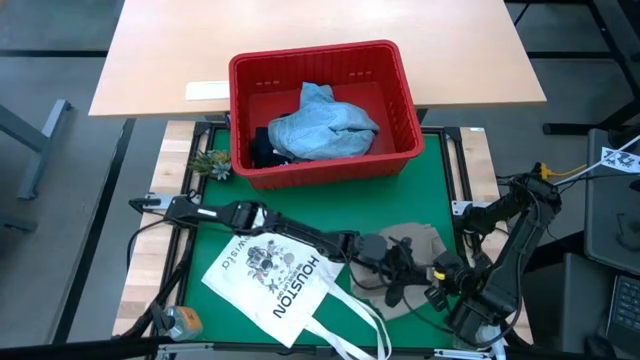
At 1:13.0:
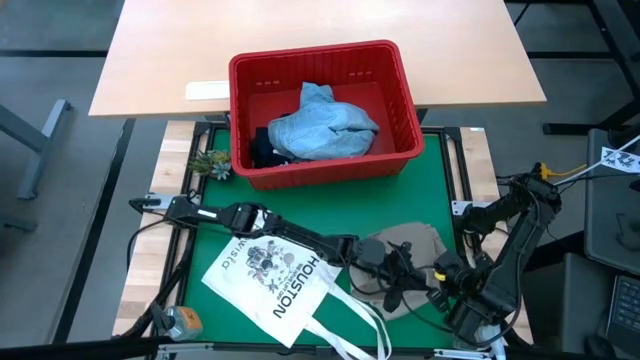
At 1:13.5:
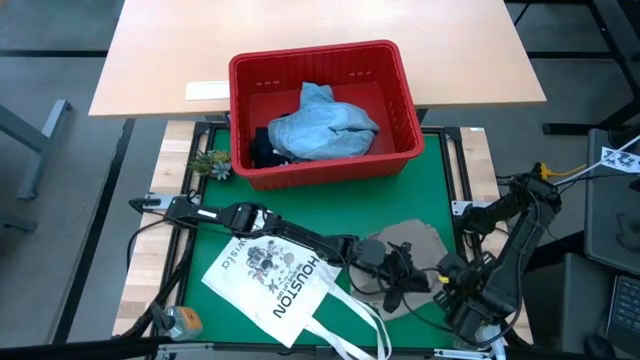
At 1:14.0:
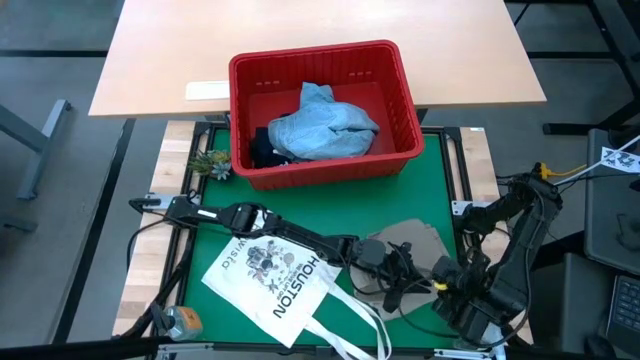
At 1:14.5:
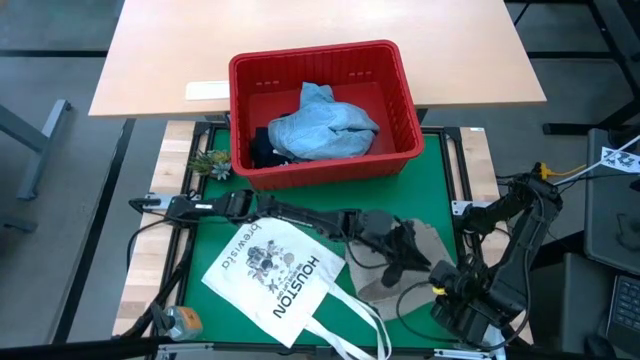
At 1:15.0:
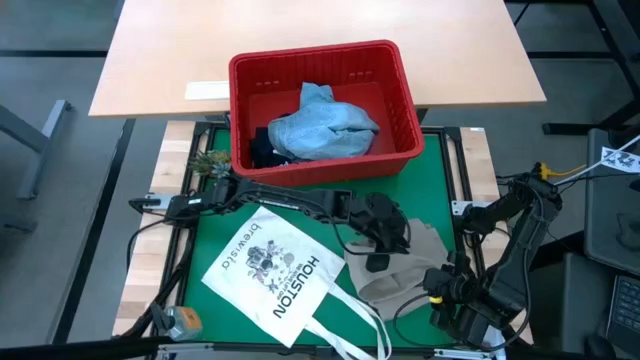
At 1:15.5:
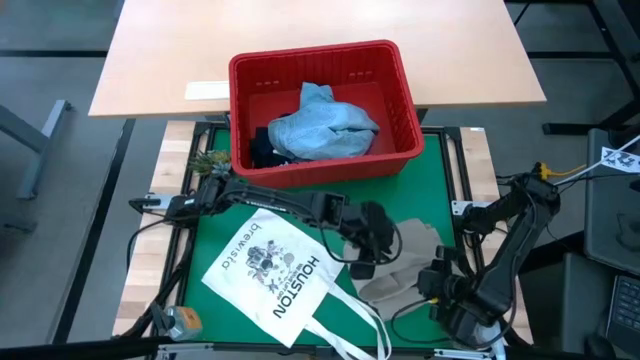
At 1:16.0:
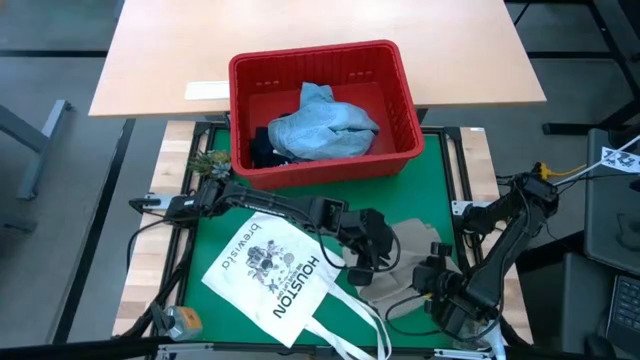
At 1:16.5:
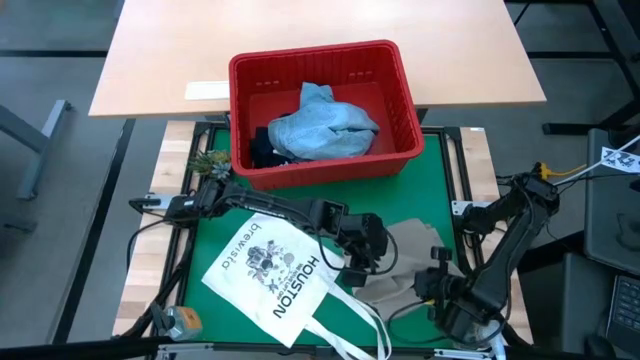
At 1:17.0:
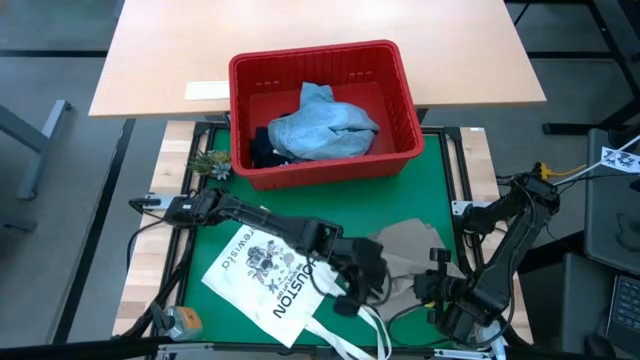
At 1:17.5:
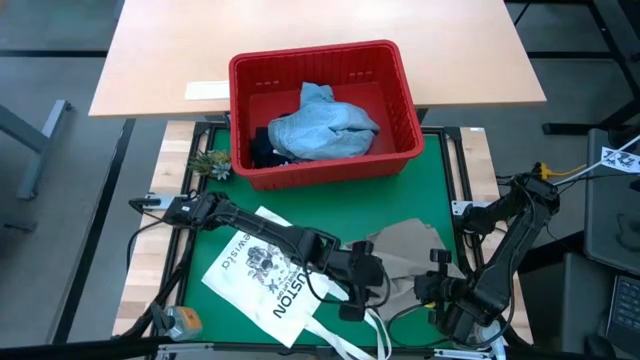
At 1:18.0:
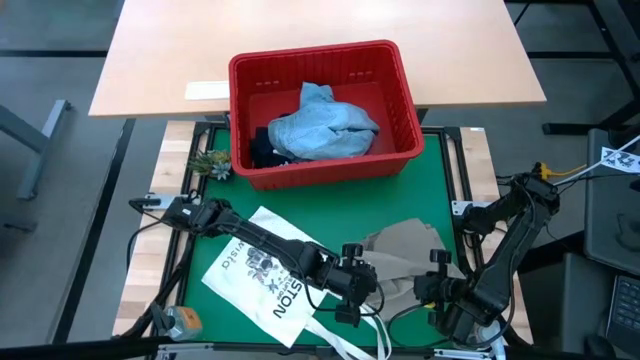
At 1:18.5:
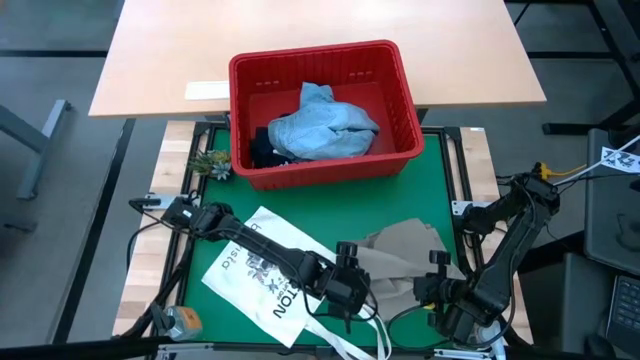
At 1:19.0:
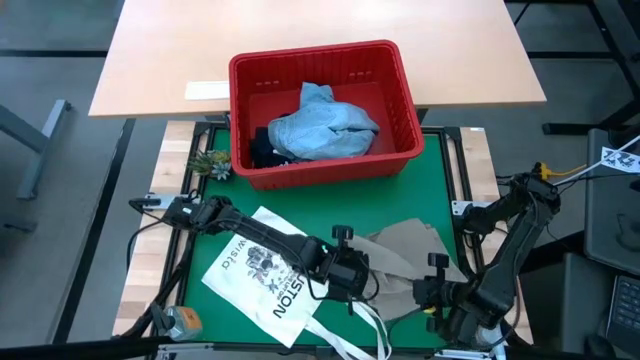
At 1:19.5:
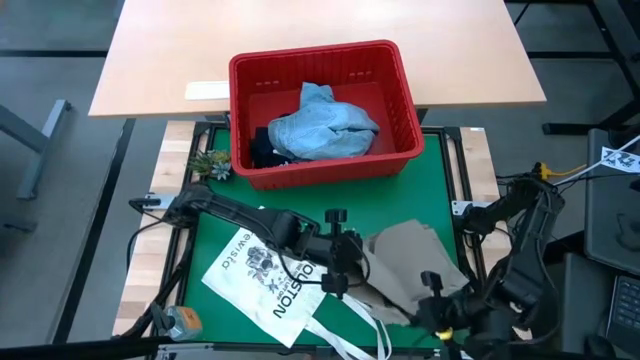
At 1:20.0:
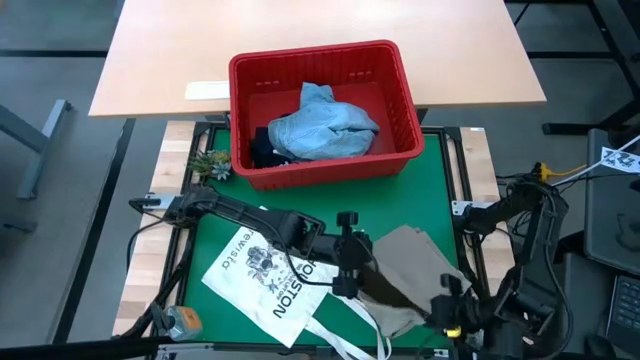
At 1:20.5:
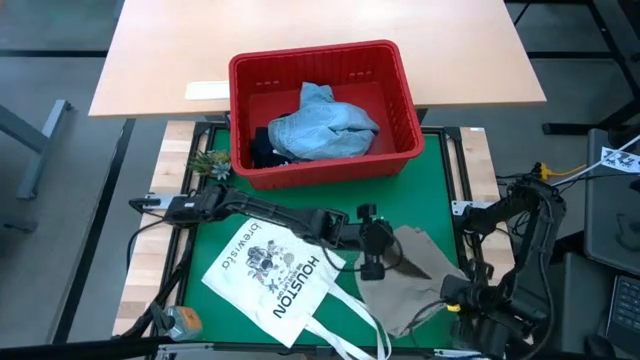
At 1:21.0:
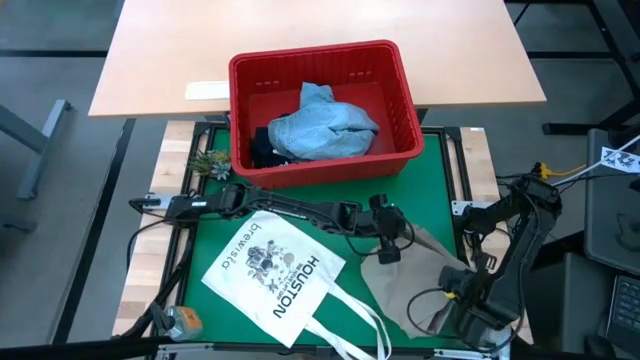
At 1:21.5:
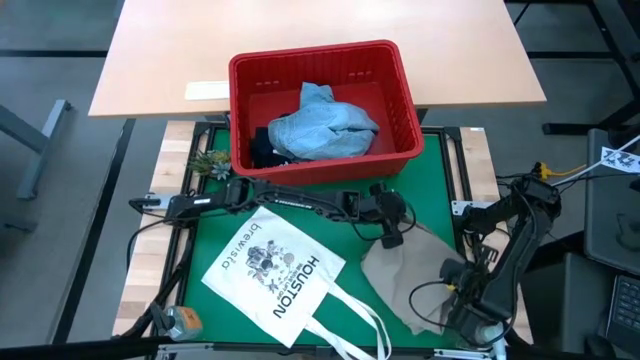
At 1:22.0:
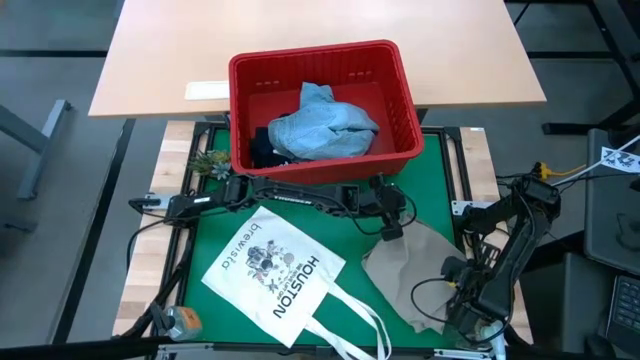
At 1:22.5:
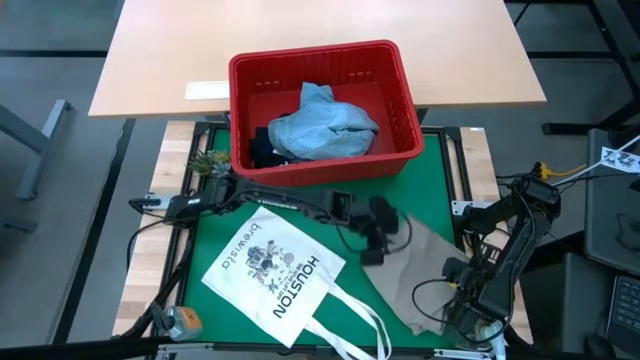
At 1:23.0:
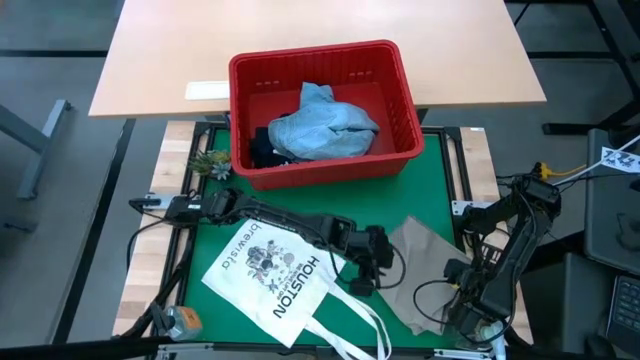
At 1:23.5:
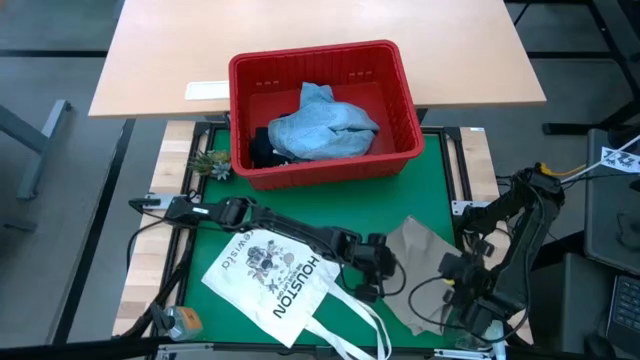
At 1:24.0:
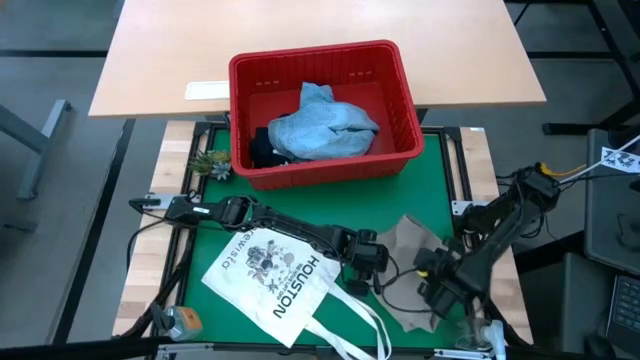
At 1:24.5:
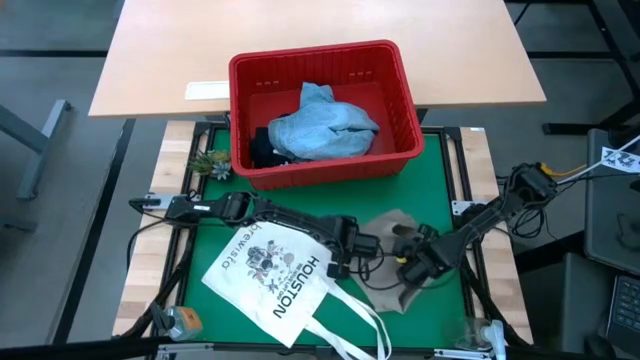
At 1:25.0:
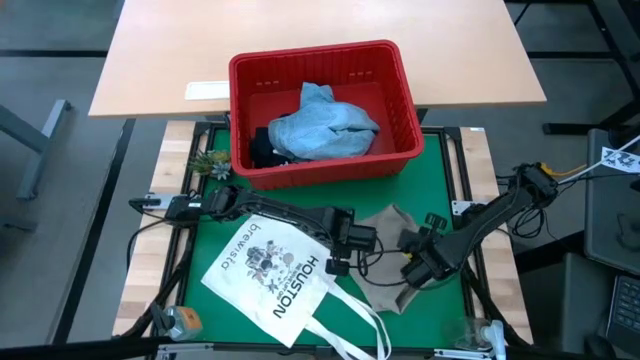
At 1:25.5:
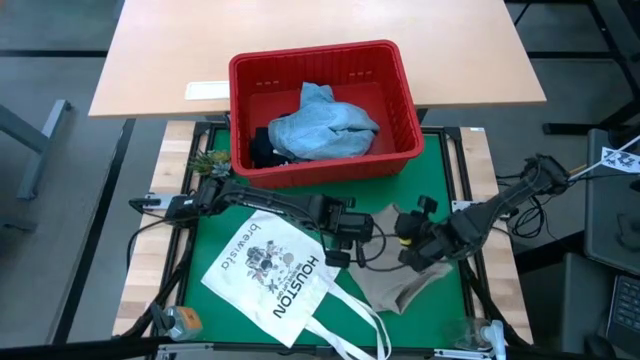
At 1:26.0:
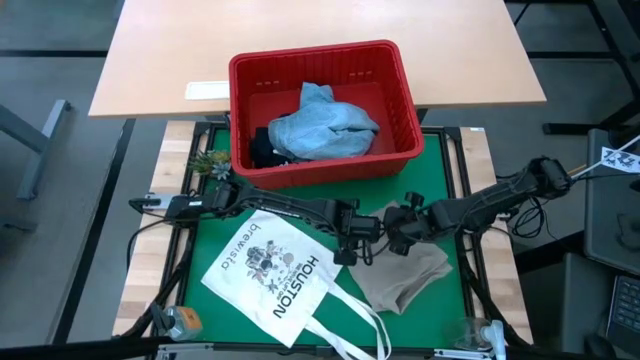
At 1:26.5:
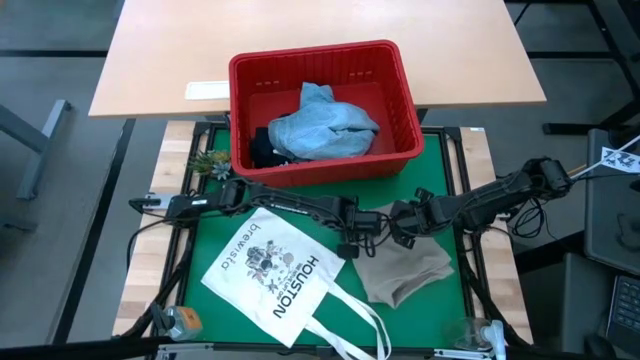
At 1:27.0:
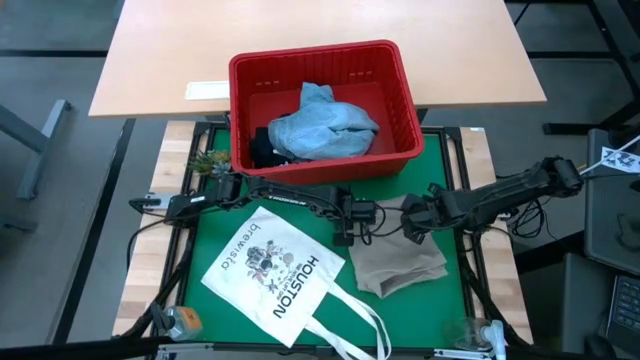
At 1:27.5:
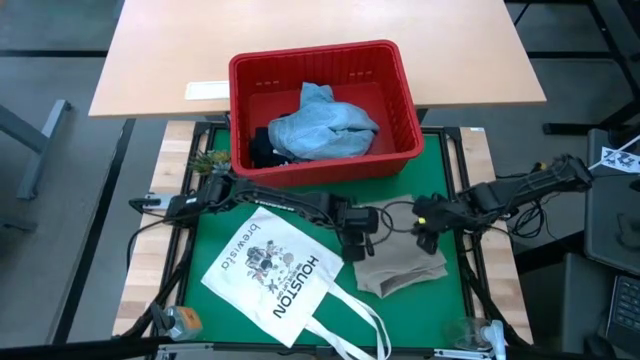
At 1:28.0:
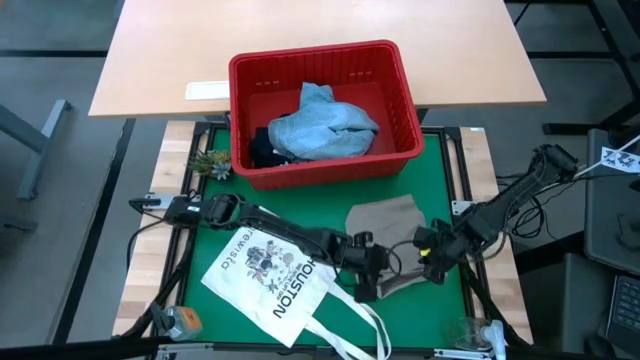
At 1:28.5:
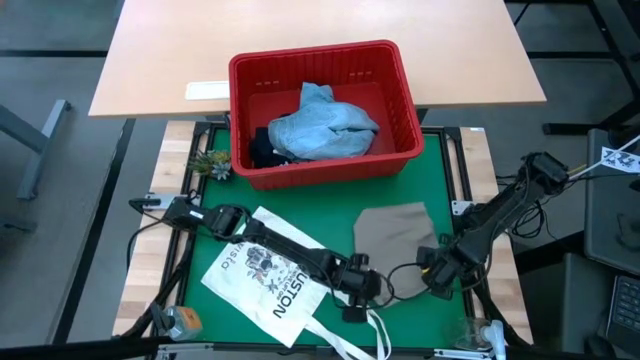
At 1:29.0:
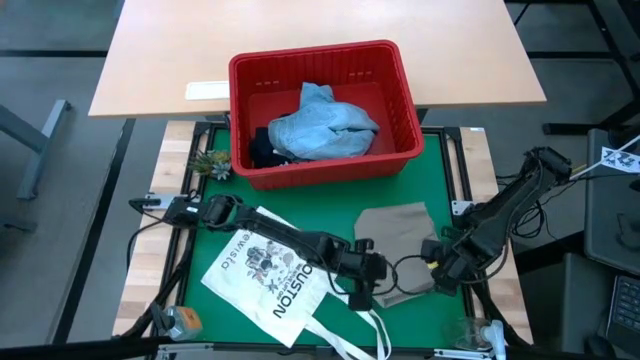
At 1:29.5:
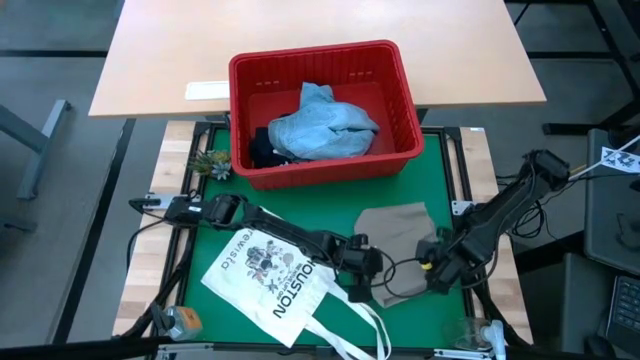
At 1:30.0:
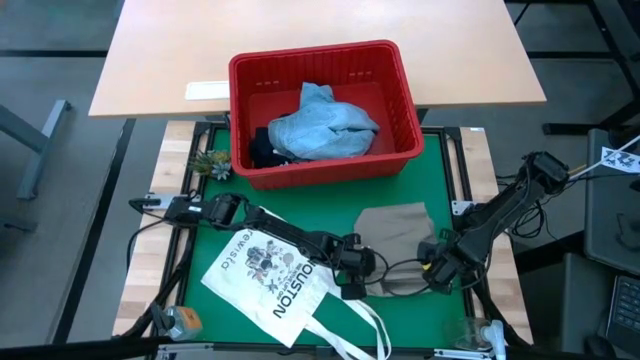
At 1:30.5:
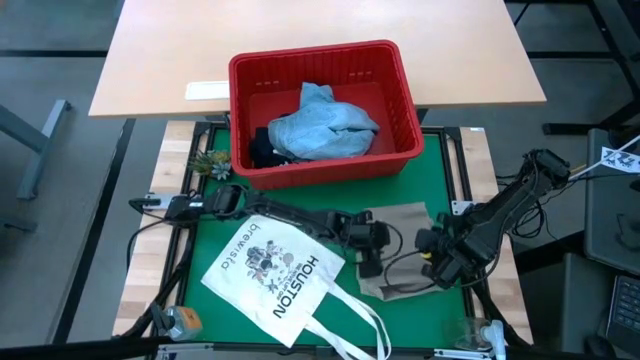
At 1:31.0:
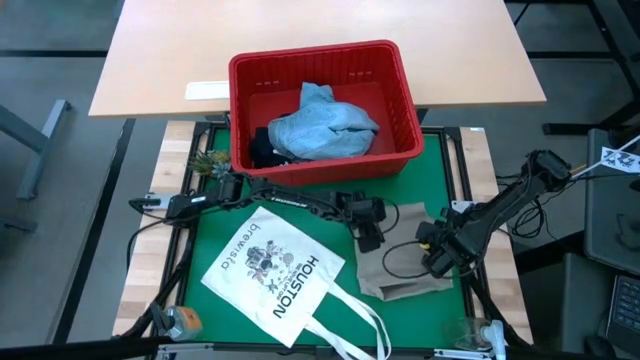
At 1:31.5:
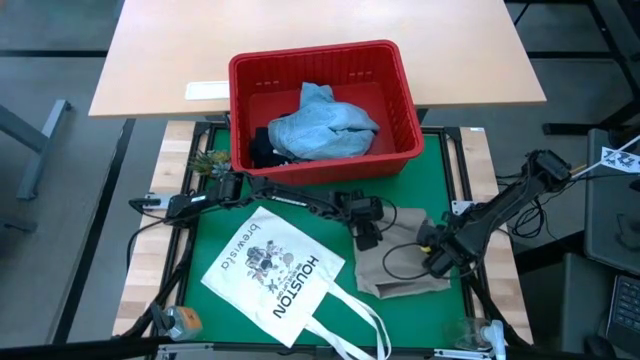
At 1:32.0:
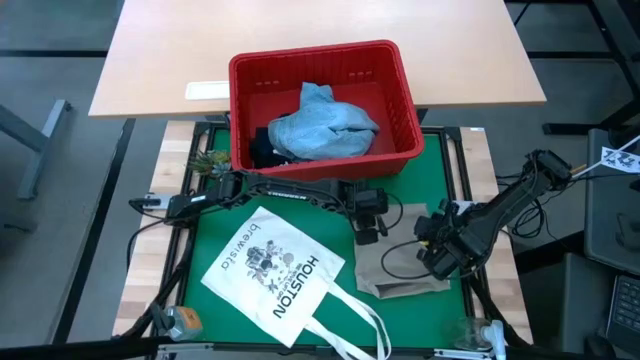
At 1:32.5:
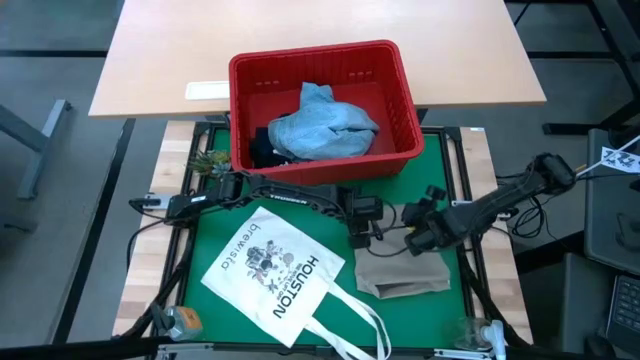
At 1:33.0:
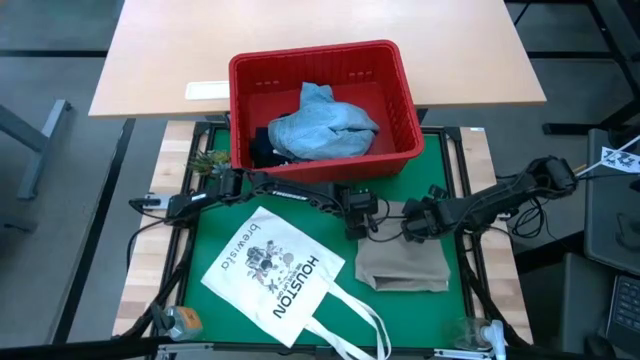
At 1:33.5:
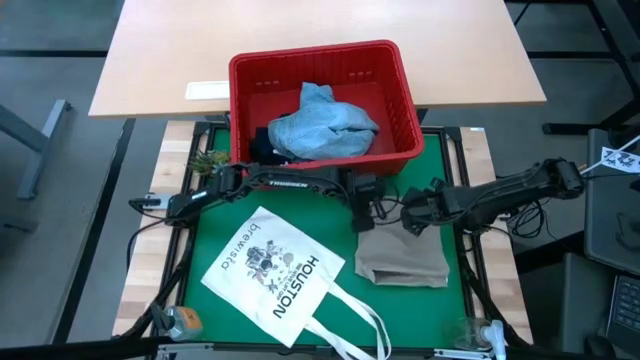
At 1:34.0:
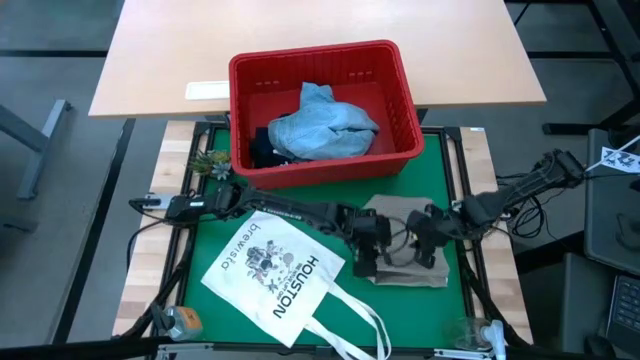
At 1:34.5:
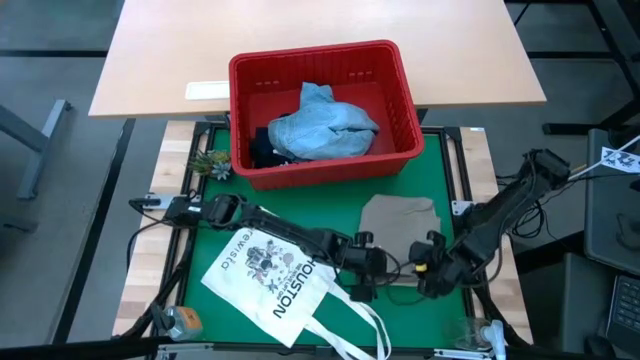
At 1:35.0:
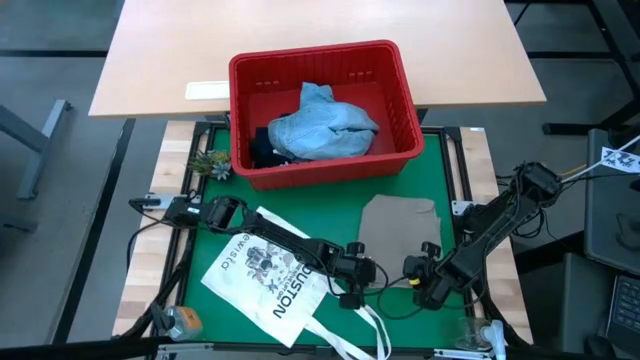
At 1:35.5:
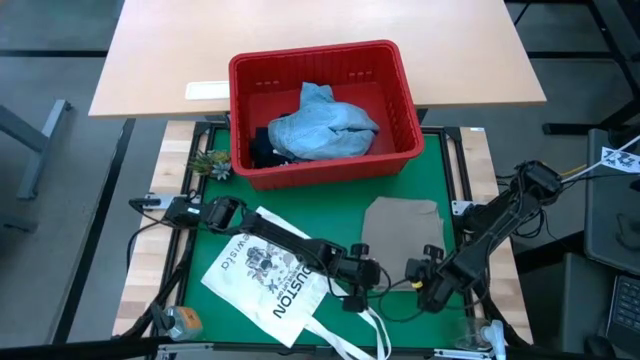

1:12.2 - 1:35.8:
Task: Fold Laundry from Bin
Fold the beige shorts
